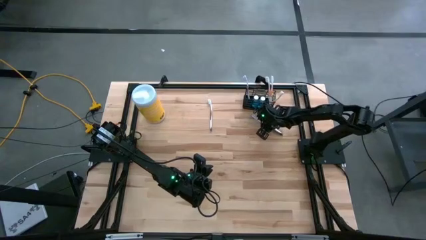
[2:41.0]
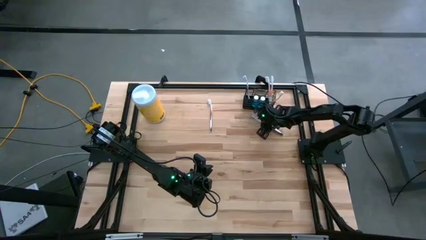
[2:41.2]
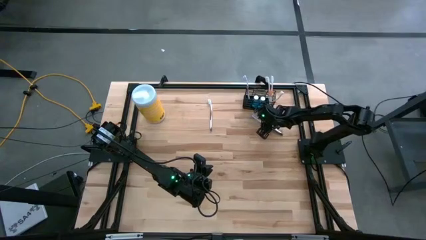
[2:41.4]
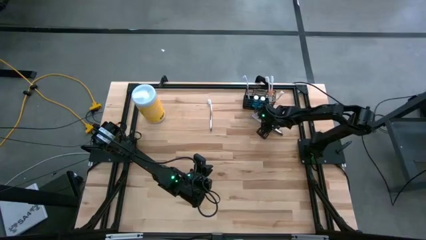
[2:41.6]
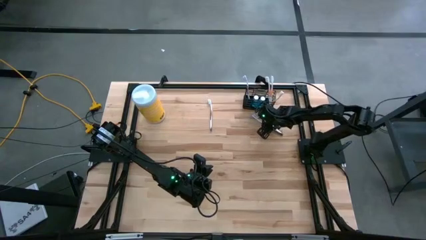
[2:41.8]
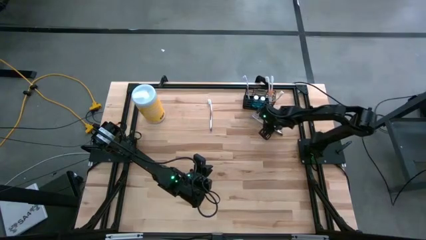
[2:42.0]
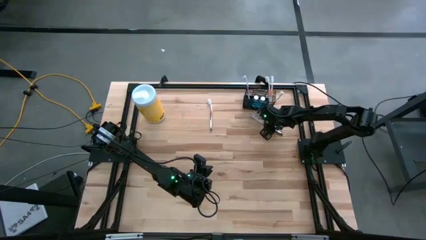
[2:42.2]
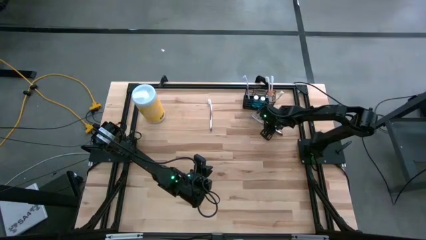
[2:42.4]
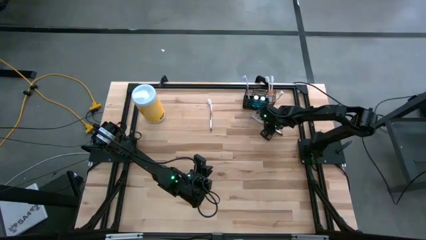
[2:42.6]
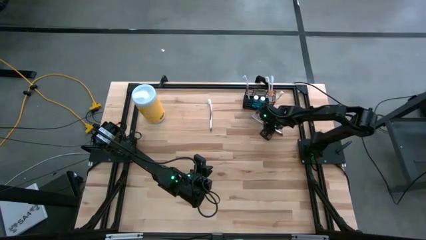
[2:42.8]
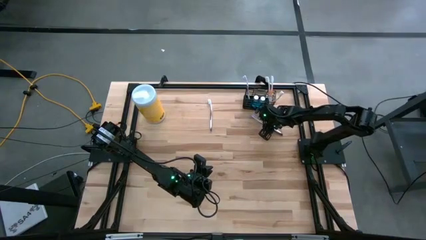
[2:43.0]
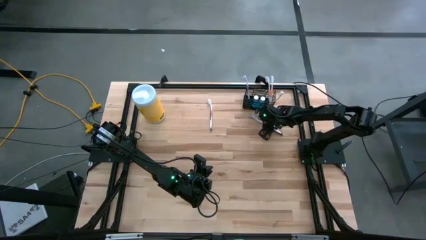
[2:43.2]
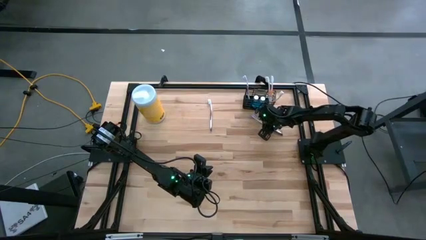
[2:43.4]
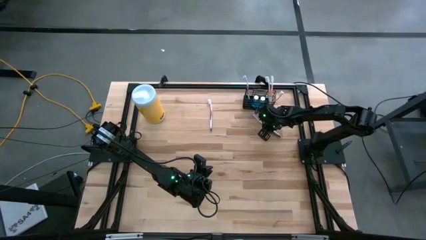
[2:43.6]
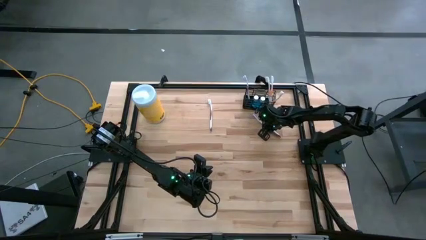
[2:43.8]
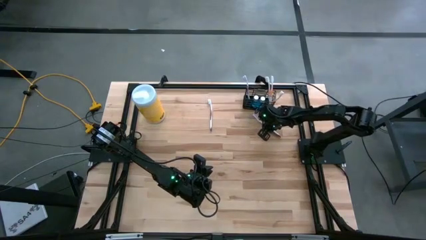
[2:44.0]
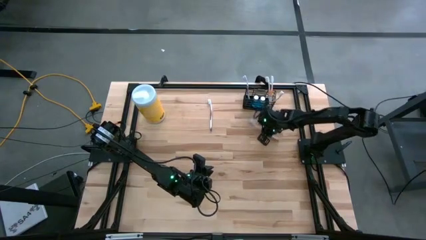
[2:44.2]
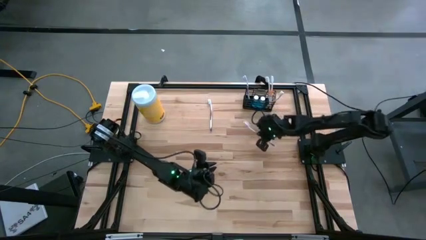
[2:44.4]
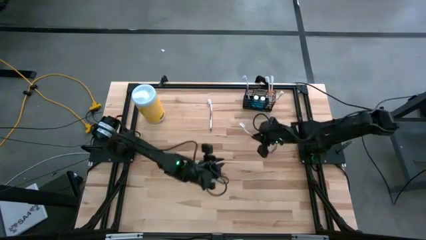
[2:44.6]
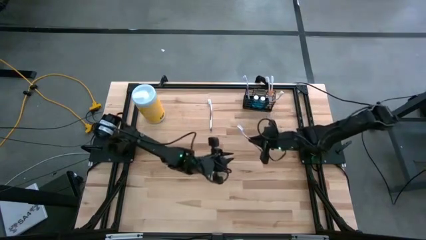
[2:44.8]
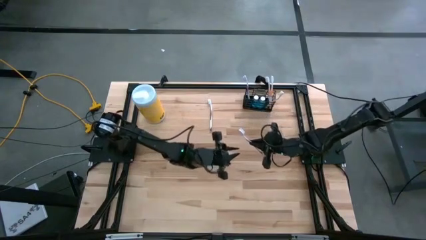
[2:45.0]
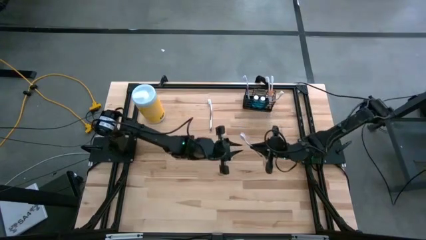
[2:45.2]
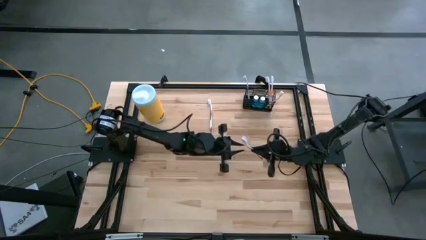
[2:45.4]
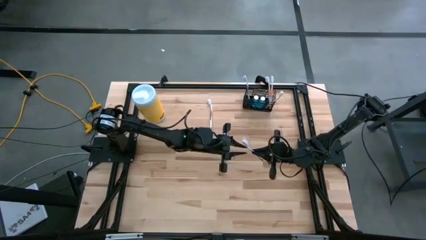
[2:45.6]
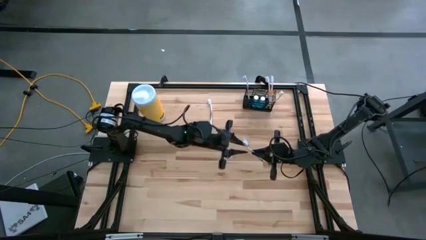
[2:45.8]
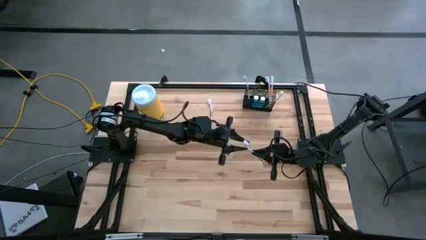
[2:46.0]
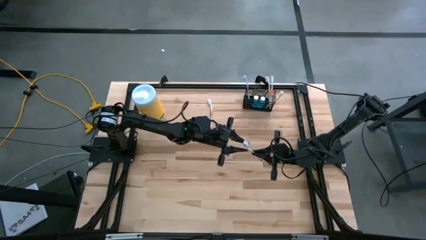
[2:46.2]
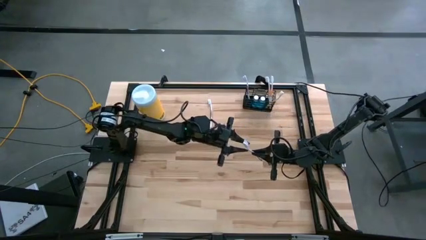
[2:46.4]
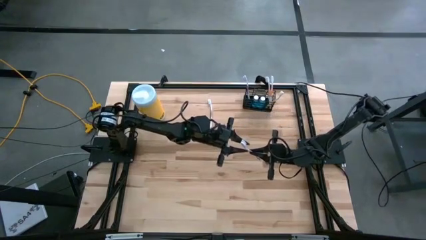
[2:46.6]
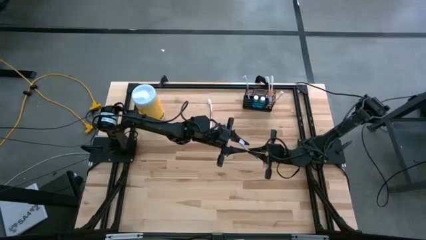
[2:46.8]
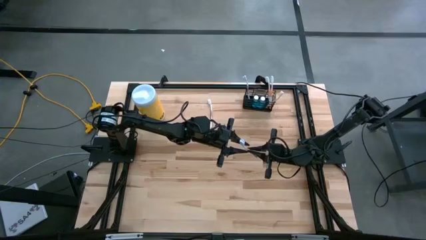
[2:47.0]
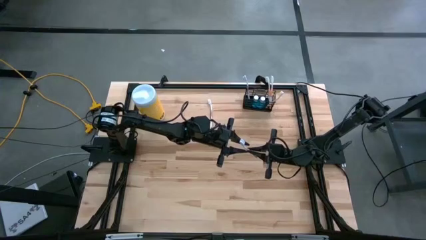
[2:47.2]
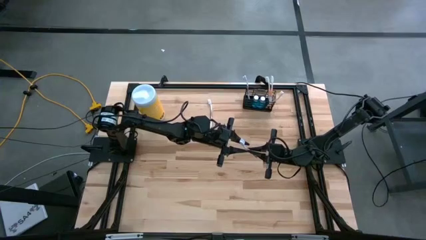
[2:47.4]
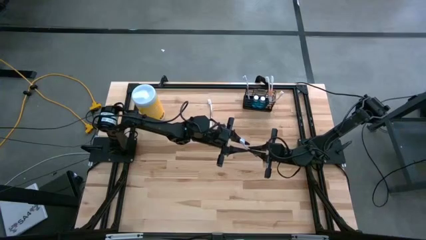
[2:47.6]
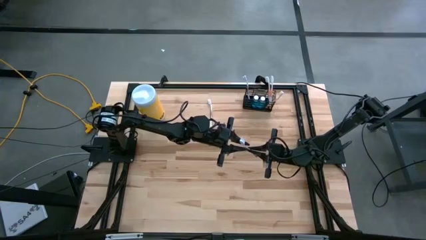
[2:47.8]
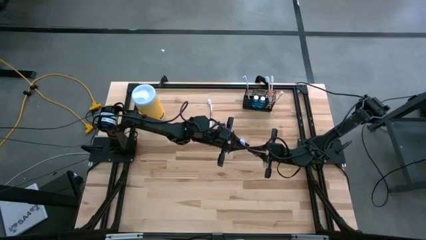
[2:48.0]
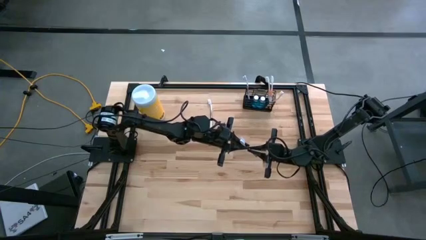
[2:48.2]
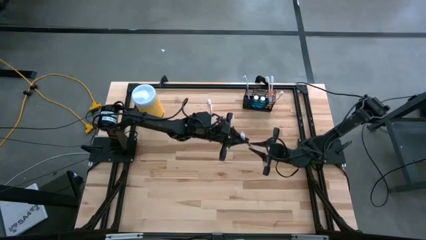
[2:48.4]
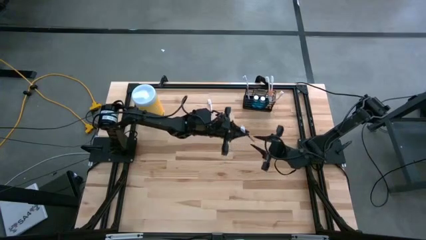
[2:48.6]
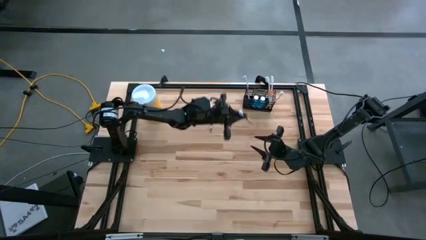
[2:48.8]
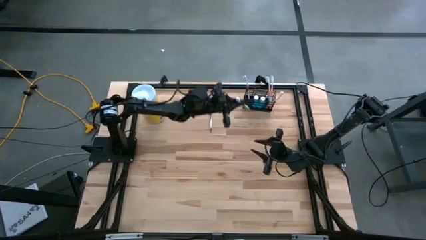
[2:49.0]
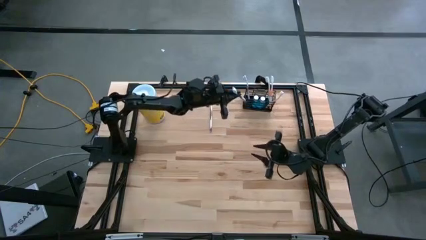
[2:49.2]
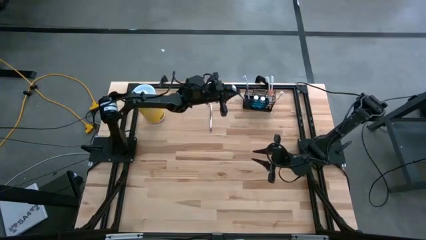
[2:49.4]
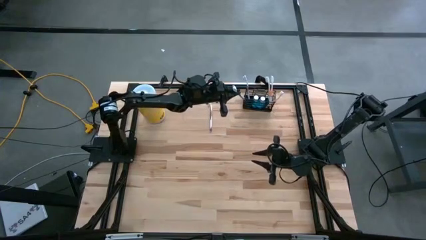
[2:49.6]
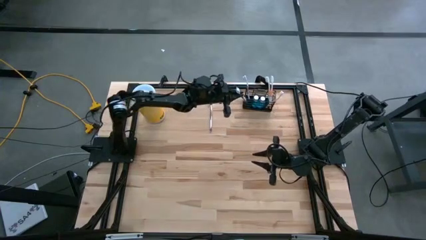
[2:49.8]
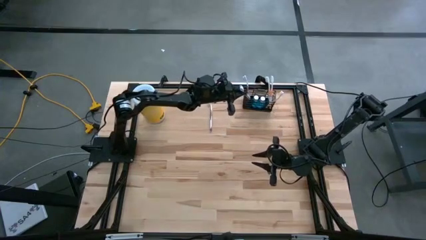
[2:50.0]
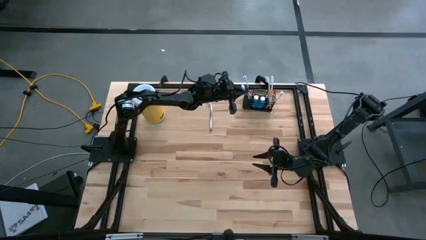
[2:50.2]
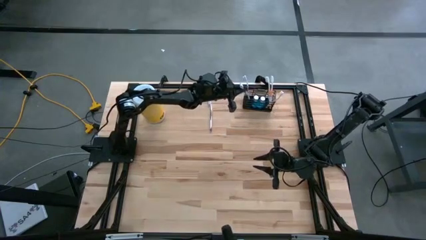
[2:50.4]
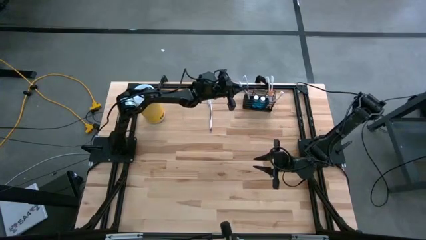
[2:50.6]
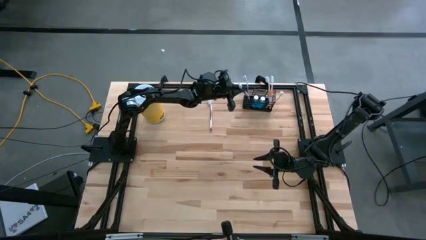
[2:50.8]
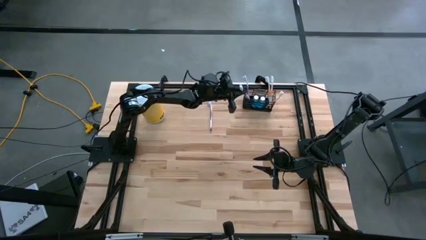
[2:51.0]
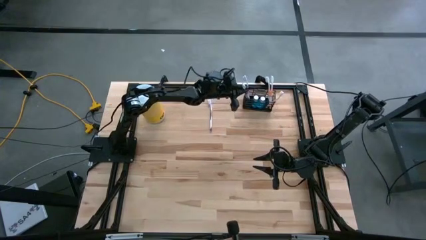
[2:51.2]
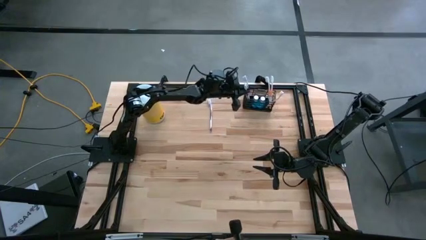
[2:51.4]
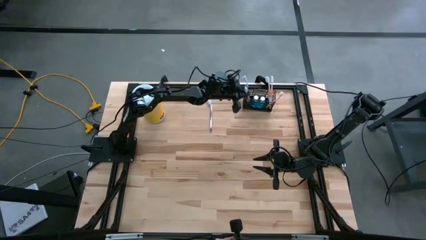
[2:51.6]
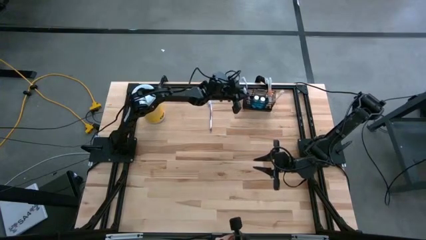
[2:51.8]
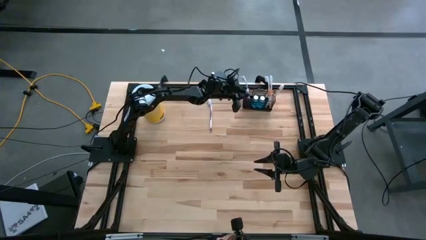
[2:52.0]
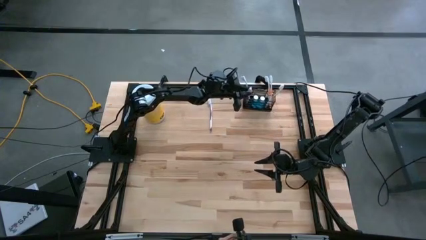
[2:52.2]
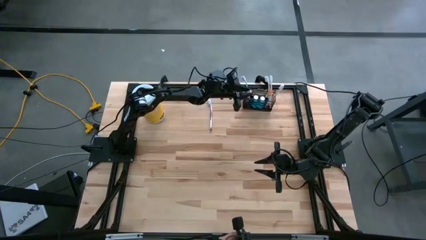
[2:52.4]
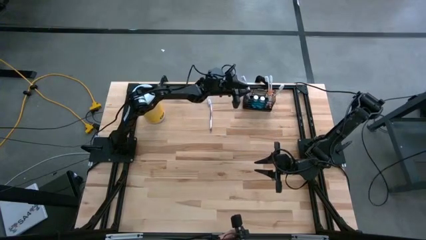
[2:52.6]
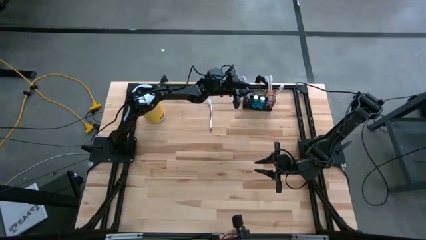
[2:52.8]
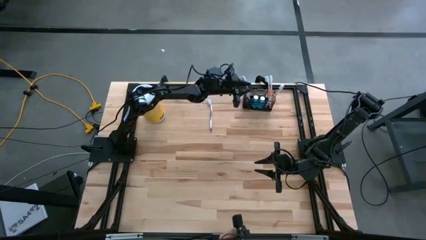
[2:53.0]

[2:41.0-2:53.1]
Task: Pick & Place toothbrushing station
Put the right violet toothbrush into the black wire organizer

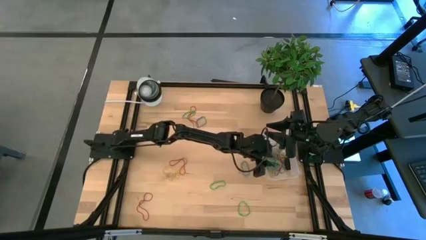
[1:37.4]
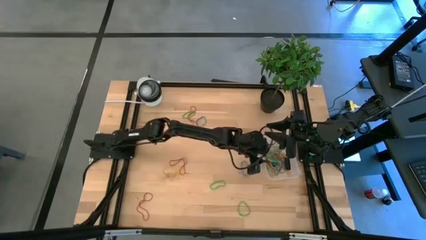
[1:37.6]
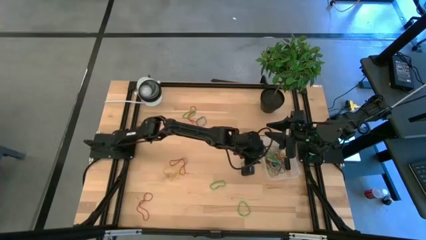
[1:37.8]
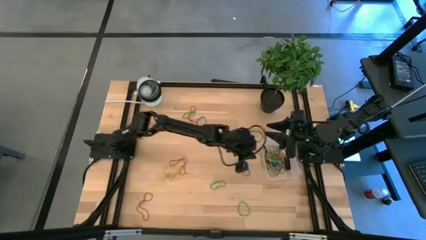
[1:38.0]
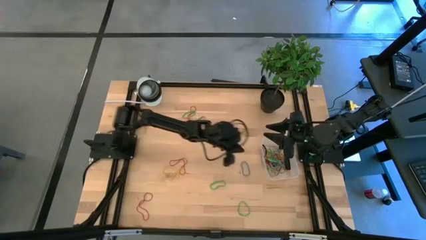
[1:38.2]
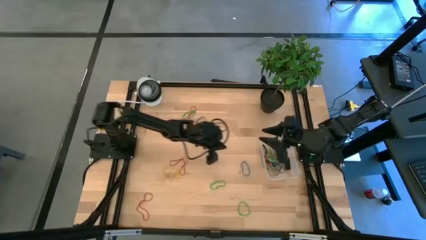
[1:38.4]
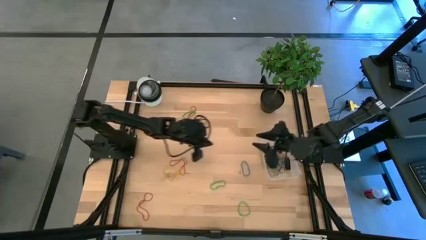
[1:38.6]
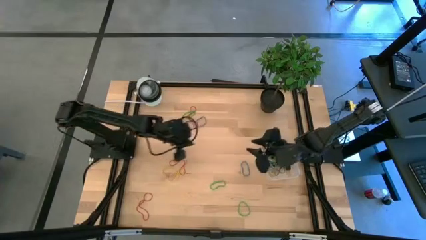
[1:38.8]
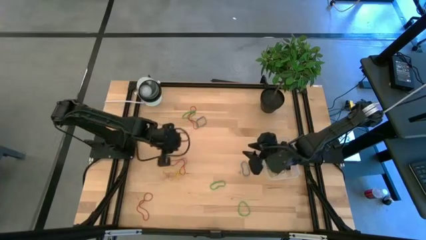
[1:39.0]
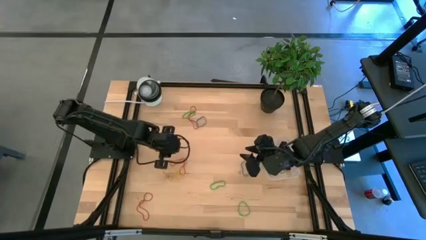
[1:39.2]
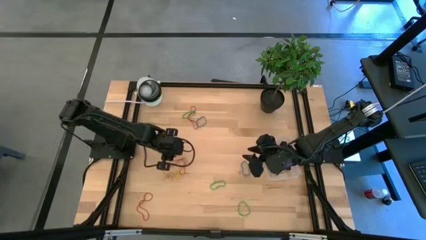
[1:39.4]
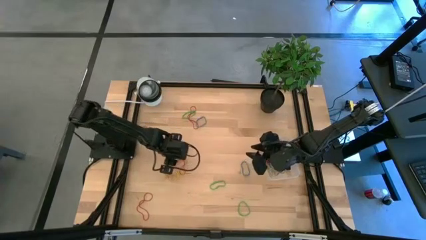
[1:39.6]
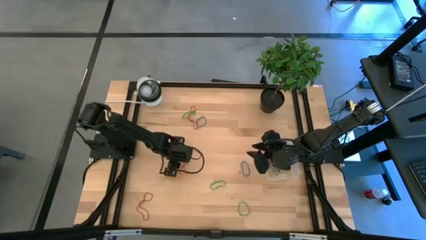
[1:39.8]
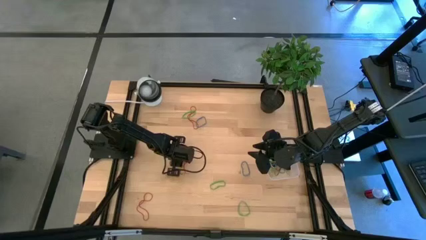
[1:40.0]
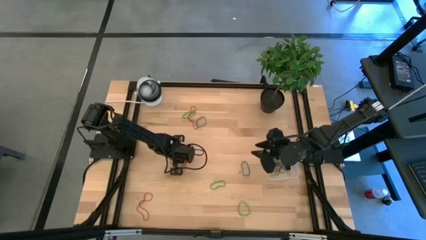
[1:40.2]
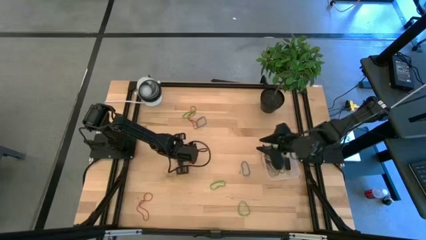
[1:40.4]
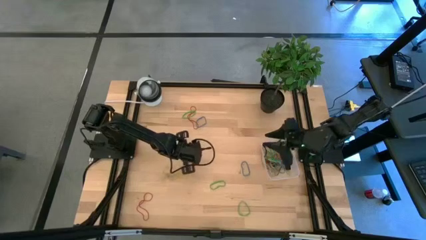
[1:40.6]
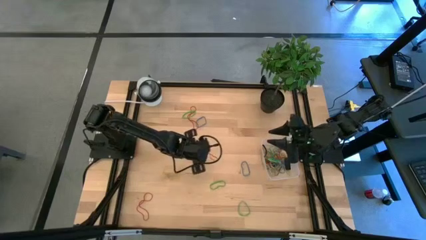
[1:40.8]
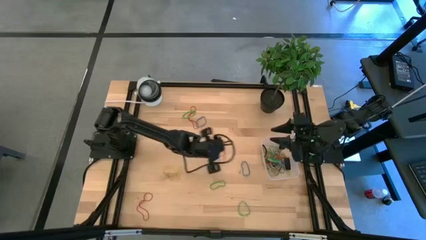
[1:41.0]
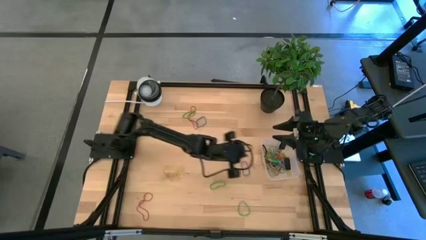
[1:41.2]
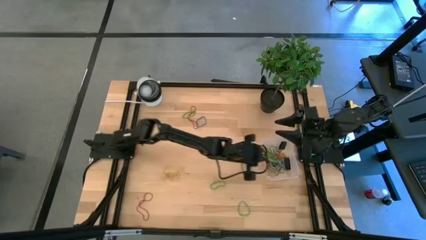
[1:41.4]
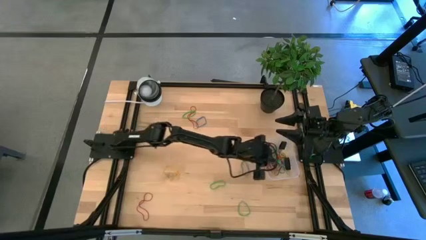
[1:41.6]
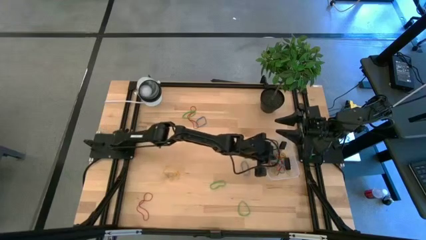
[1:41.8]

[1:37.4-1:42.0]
Task: Pick and place rubber bands into bin
Put the red rubber band into the transparent bin

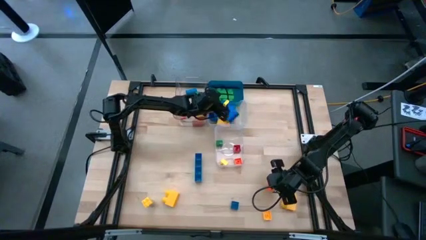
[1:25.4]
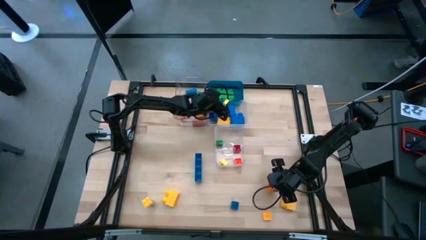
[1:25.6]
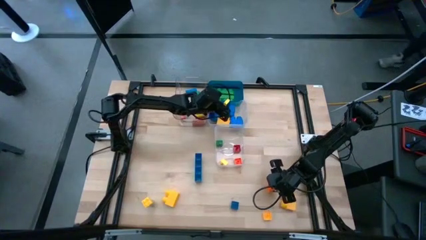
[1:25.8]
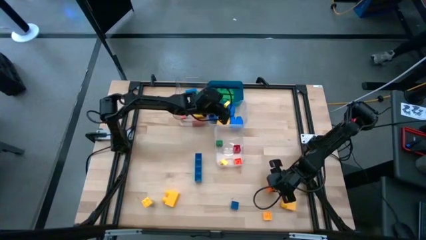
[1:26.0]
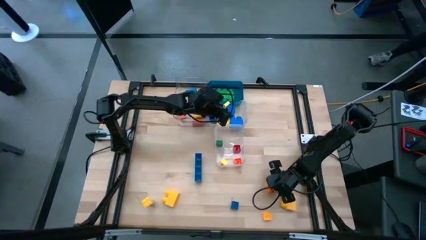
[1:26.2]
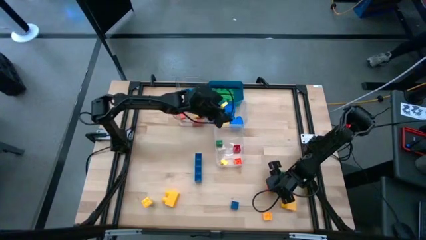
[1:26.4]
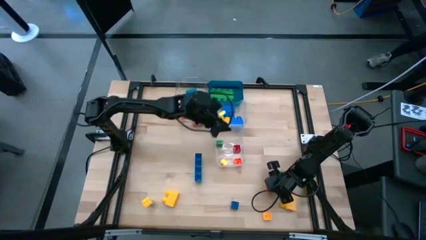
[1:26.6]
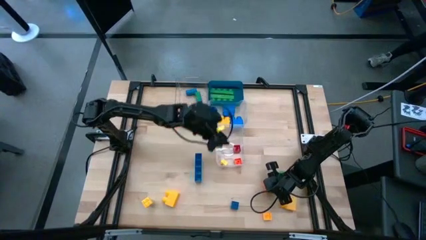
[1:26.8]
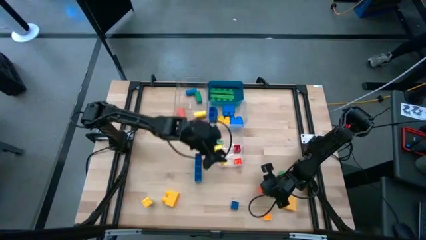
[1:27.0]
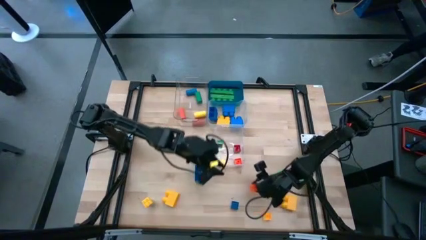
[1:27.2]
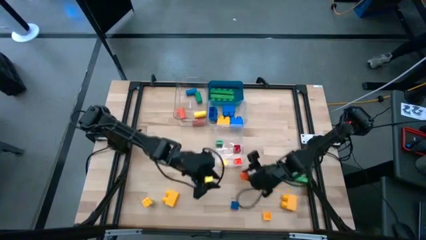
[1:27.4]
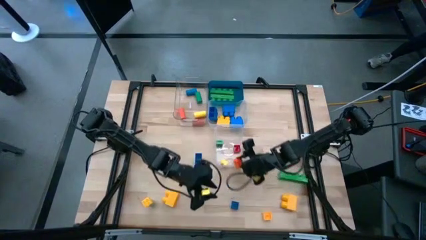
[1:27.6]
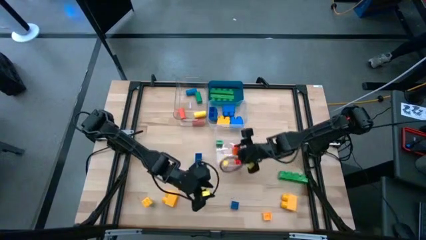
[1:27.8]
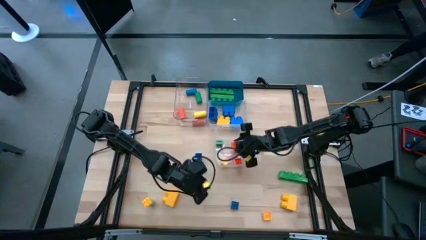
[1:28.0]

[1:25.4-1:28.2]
Task: Sort blocks by size
Put the orange 4 stud small game piece into the bottom transparent bin
